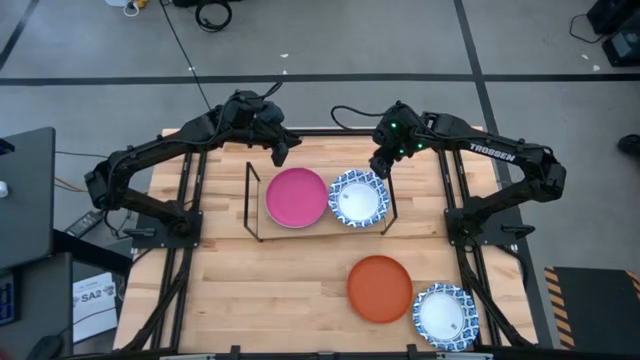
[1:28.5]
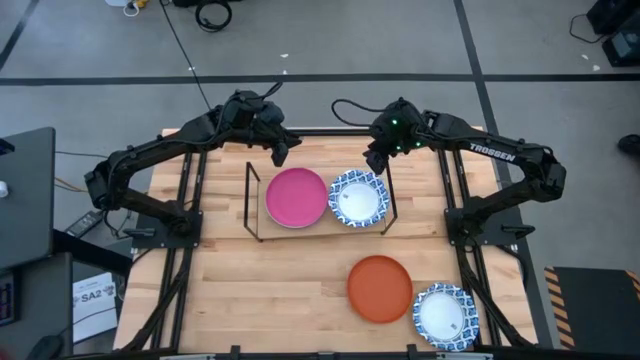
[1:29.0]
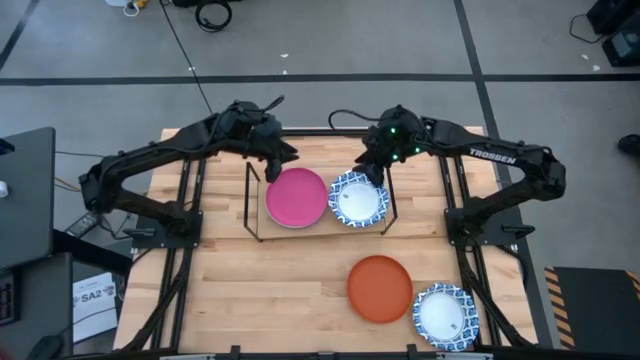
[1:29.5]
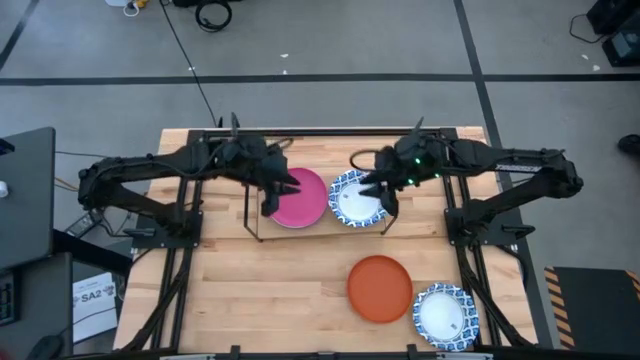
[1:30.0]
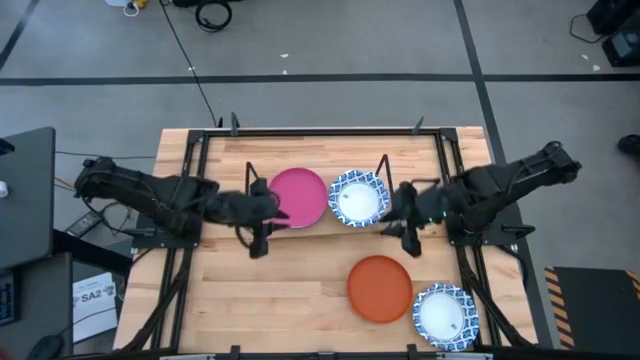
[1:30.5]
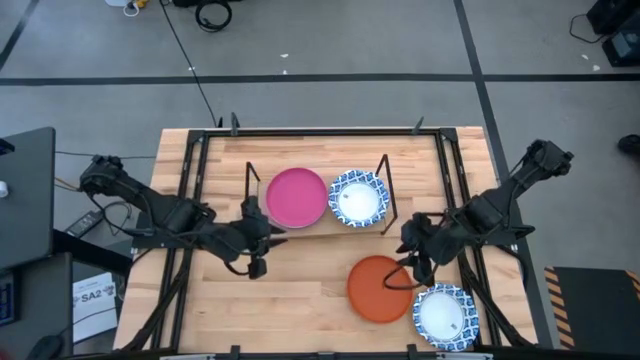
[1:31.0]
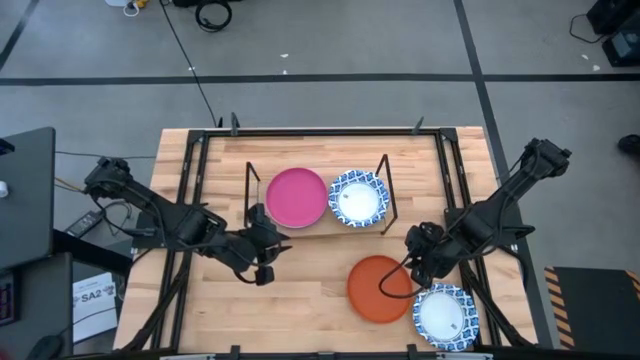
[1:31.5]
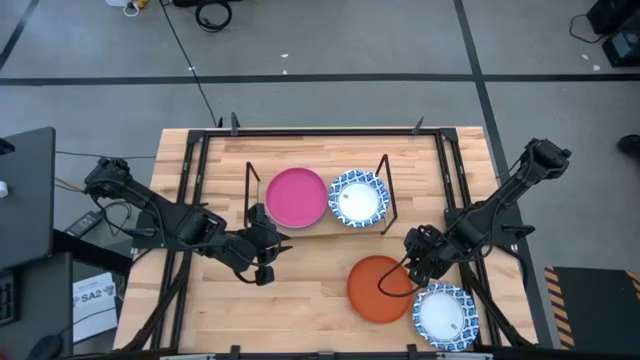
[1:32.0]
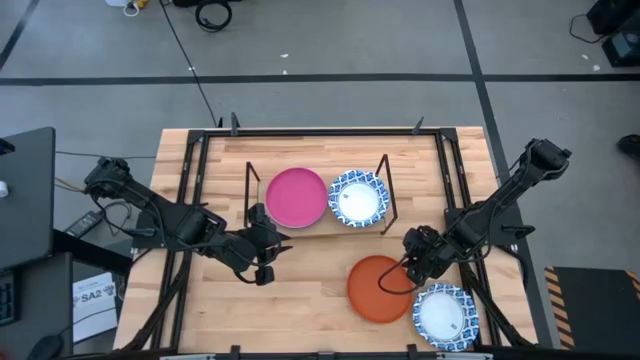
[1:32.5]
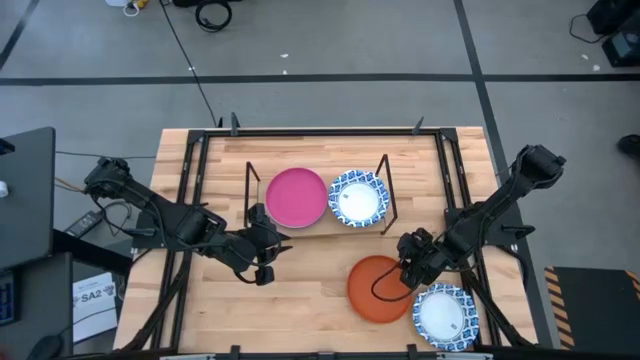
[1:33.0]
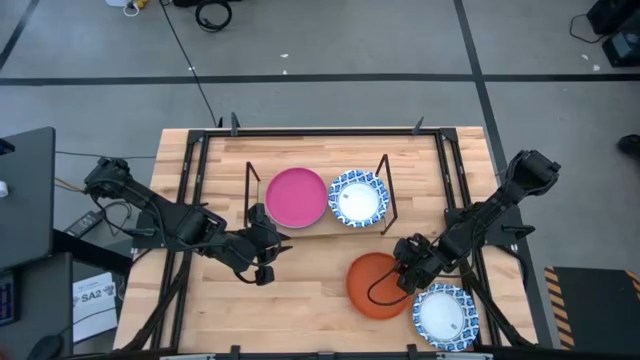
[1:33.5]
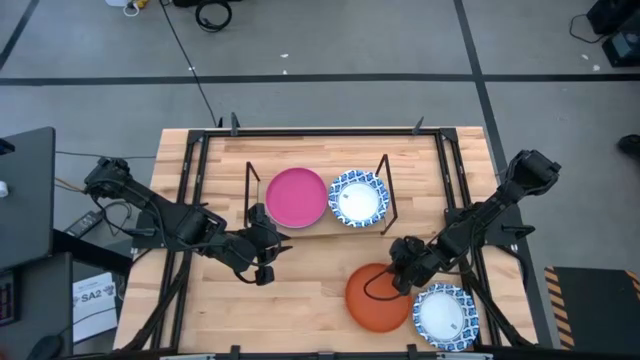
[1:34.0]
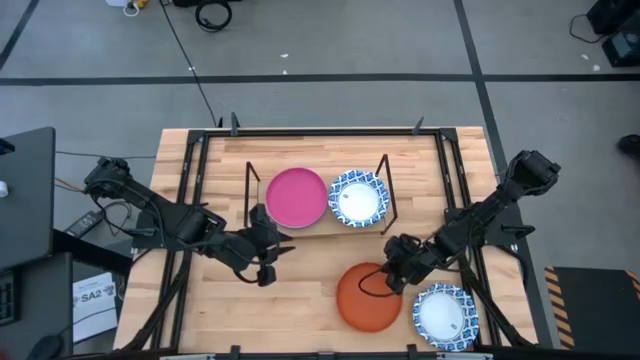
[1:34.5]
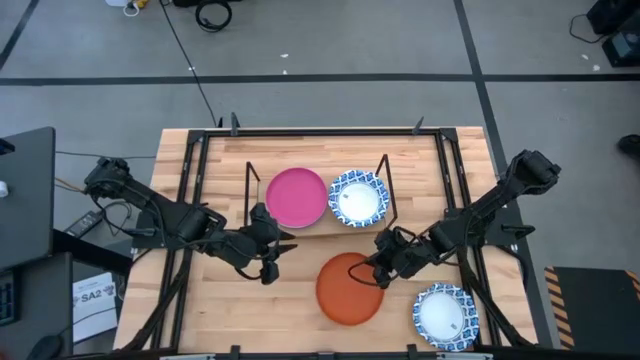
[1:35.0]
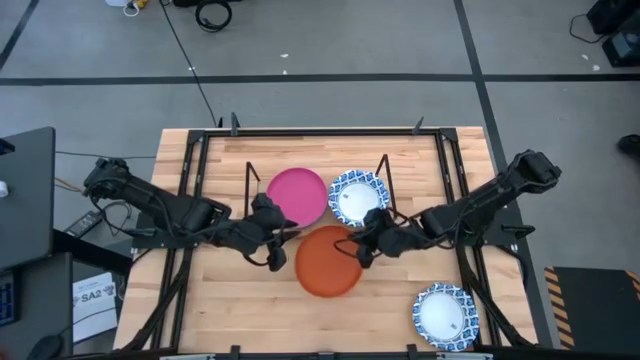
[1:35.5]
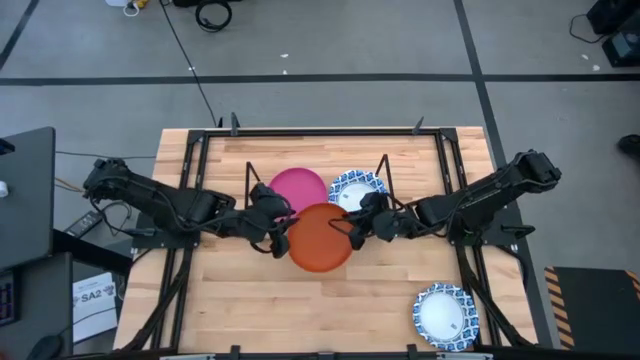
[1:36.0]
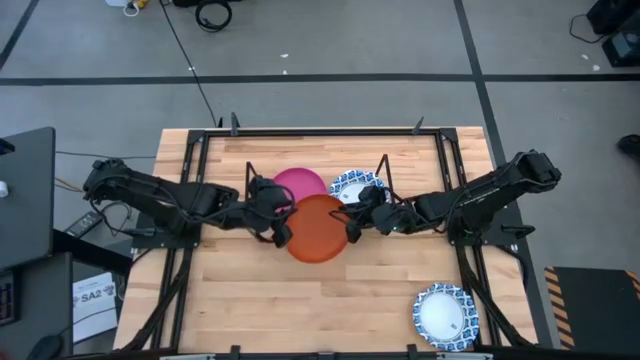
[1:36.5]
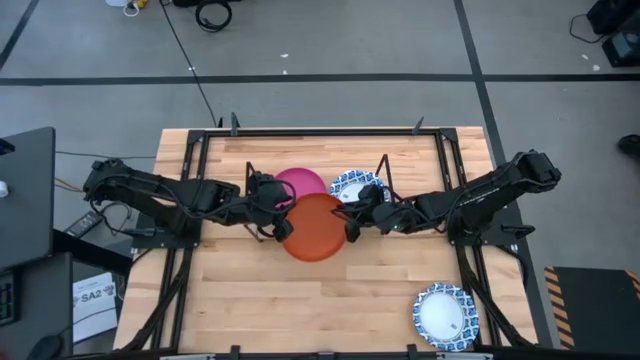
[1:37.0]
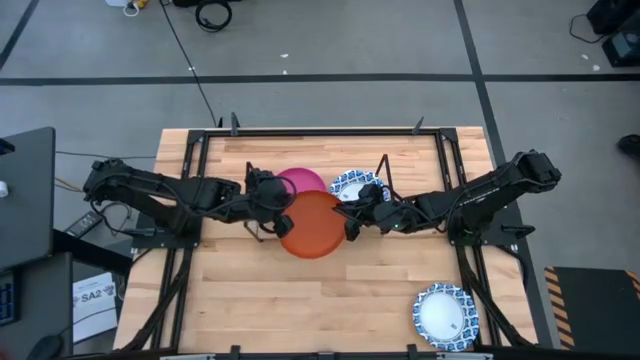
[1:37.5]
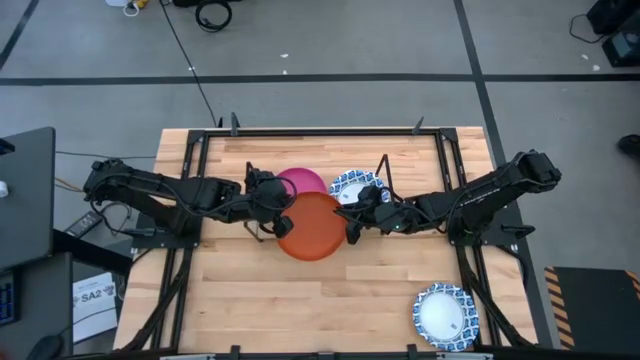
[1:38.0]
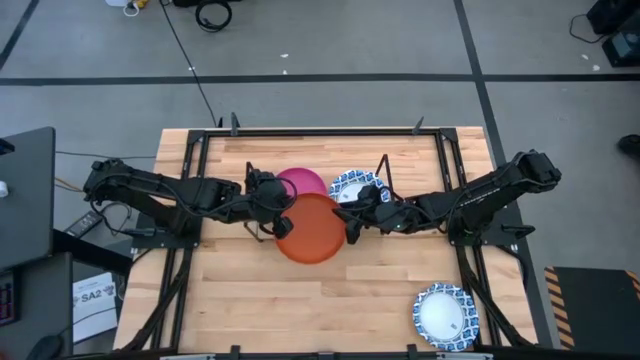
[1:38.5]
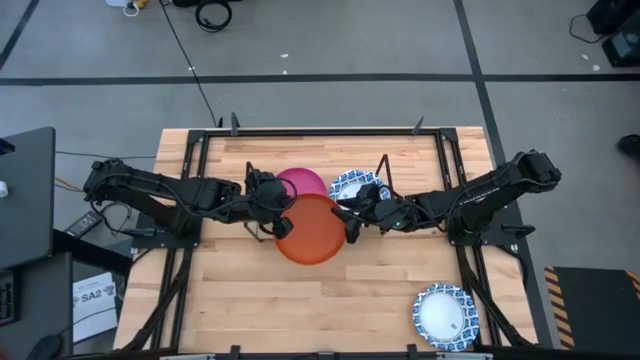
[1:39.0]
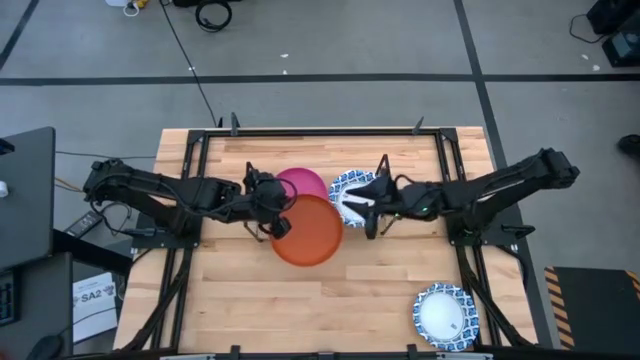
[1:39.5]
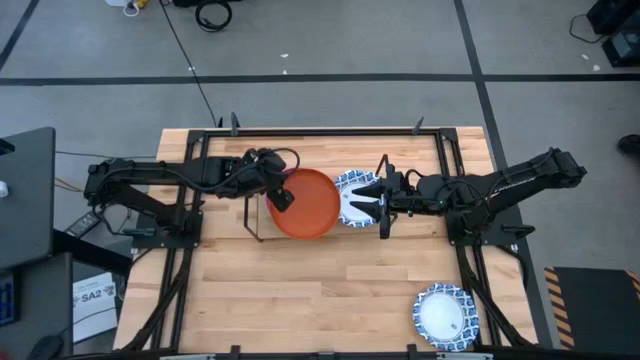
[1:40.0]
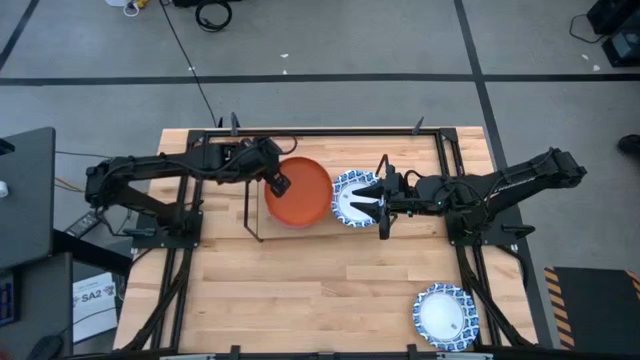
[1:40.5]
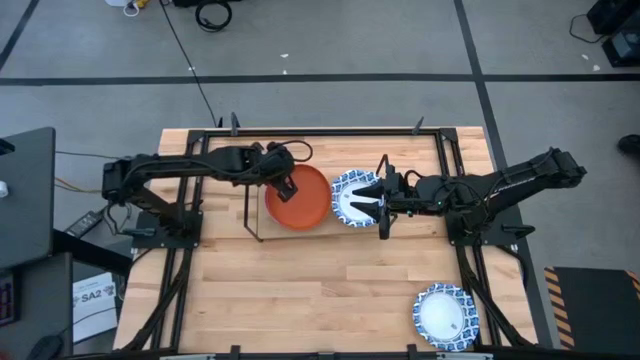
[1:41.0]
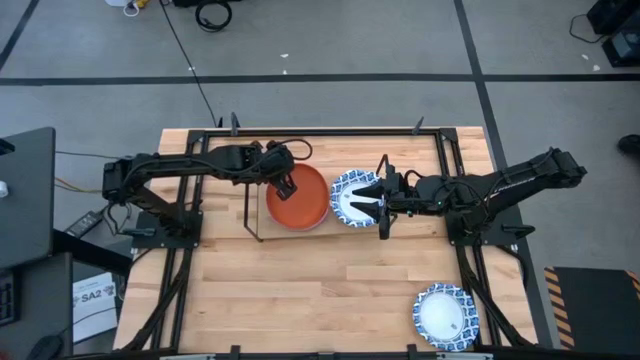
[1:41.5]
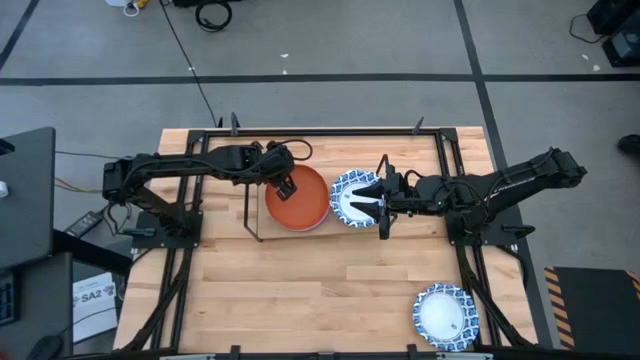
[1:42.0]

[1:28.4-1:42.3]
Task: Place and stack plates onto a shelf
Stack the orange plate on top of the pink plate on the shelf

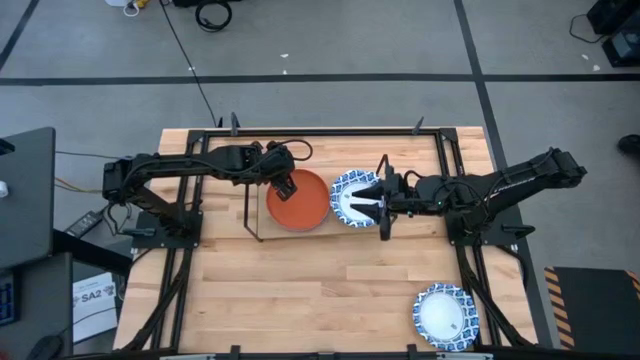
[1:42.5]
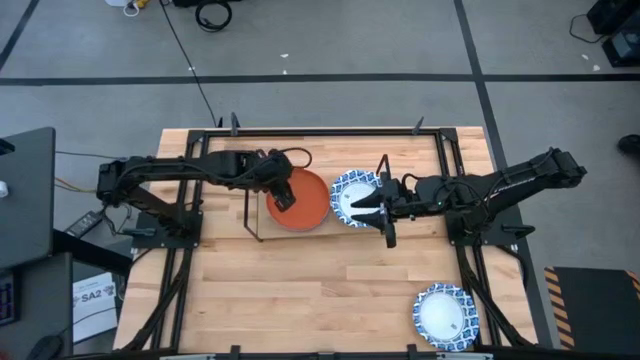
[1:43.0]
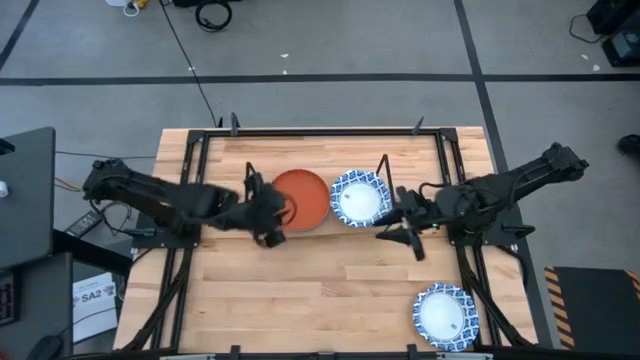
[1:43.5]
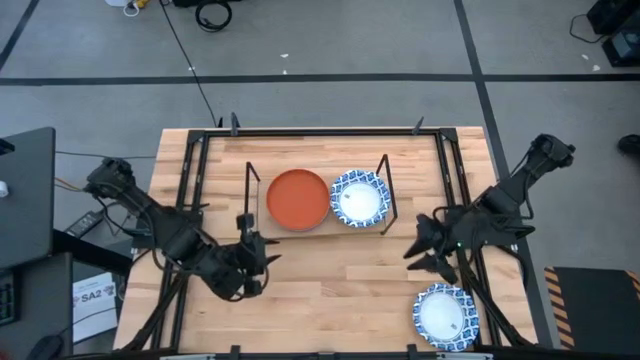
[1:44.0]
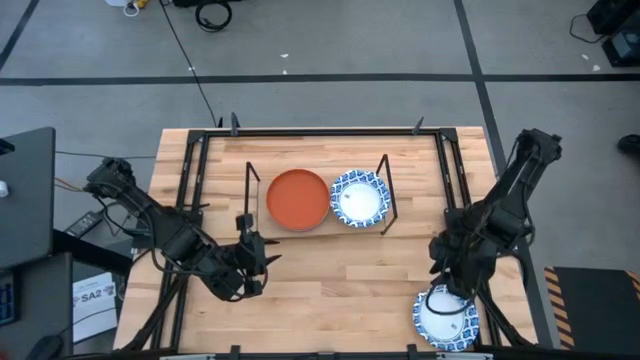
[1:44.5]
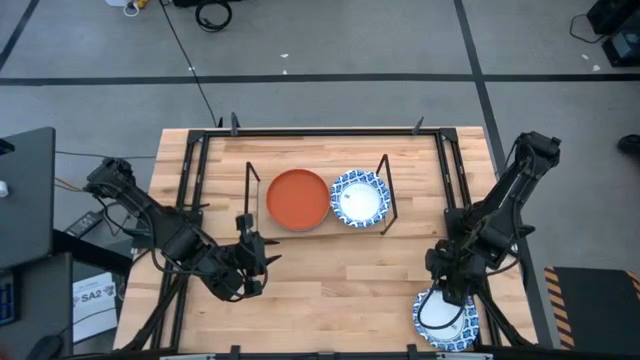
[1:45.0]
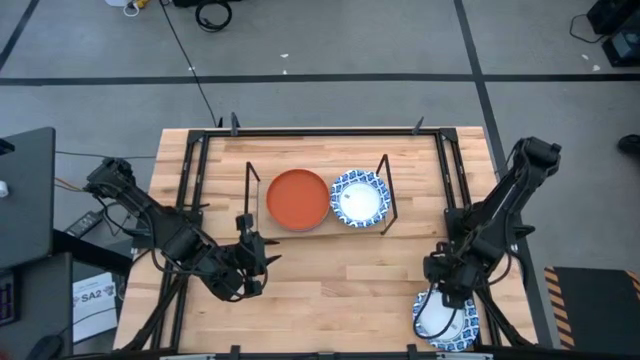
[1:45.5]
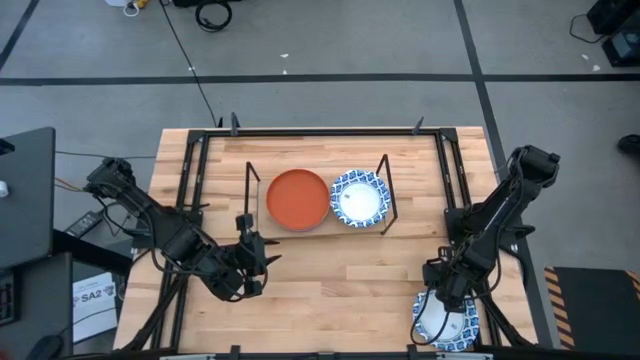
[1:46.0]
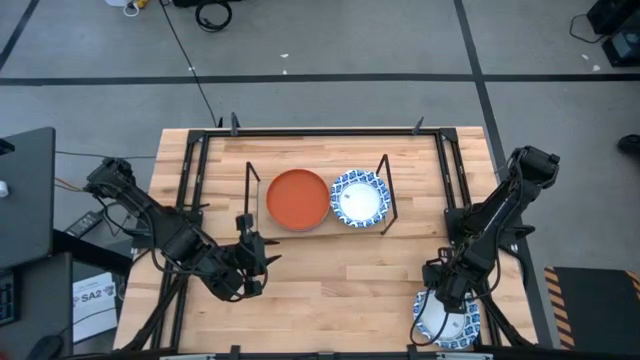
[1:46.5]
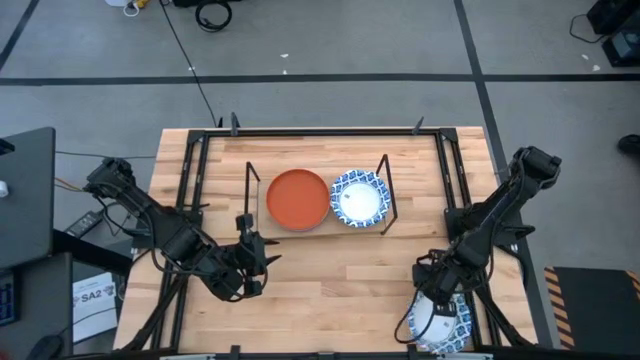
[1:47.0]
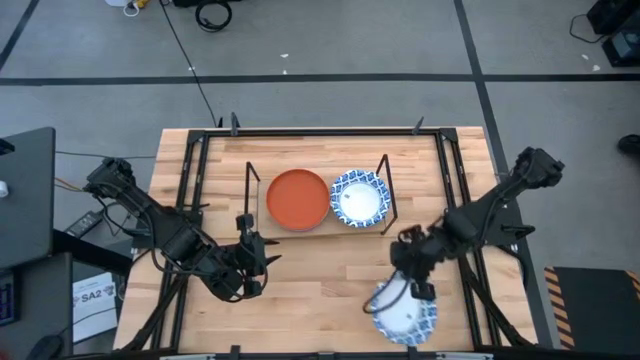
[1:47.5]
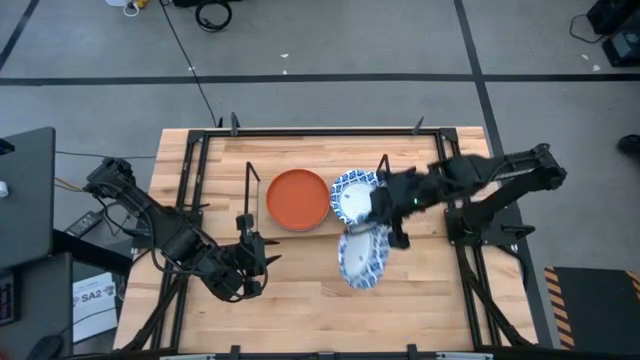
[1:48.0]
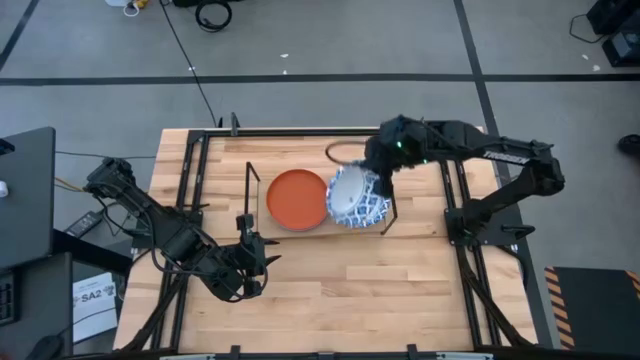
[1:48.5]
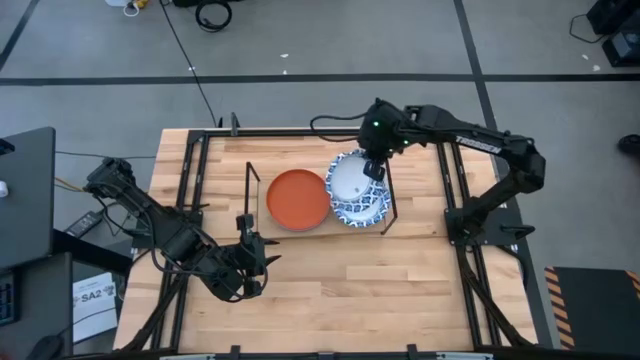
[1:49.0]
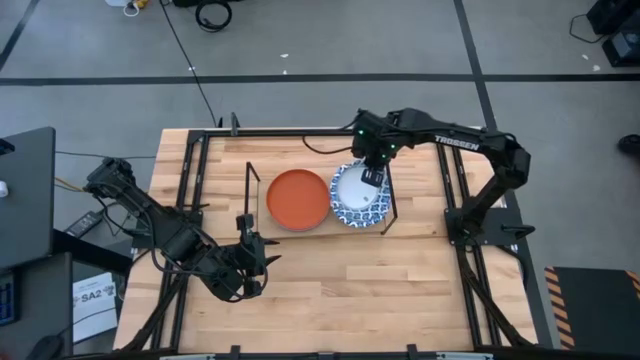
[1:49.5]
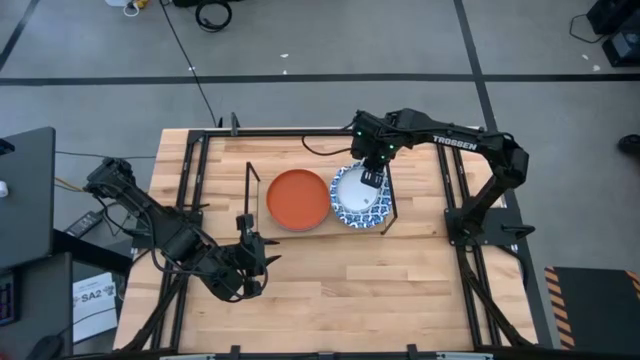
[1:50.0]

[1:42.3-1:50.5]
Stack the white-blue patterned bowl on top of the white-blue patterned bowl on the shelf
